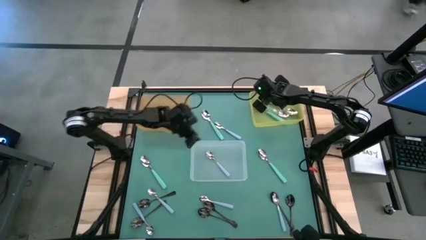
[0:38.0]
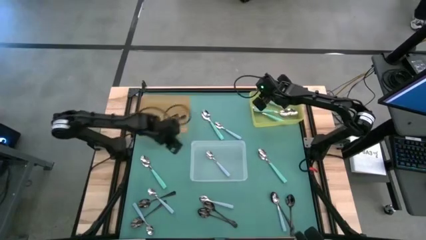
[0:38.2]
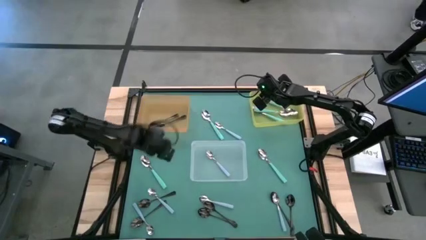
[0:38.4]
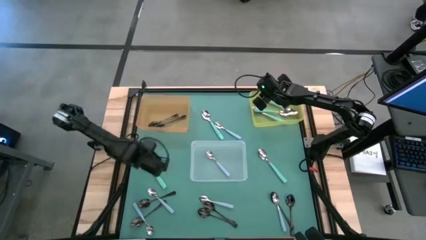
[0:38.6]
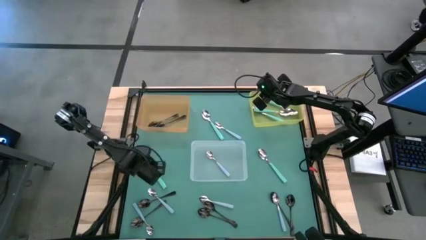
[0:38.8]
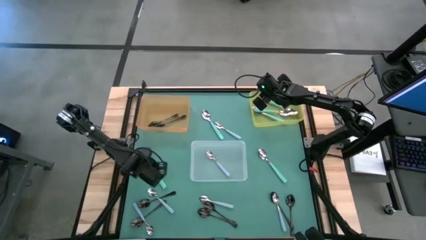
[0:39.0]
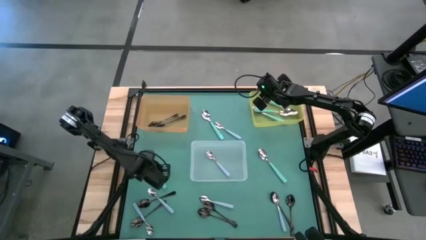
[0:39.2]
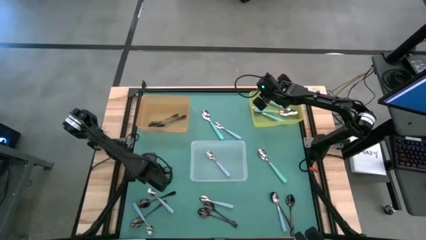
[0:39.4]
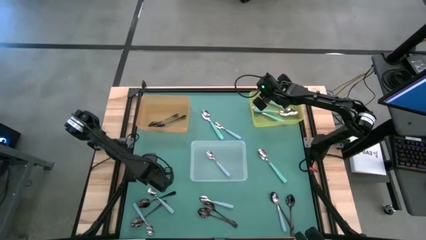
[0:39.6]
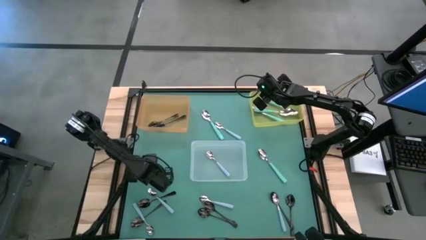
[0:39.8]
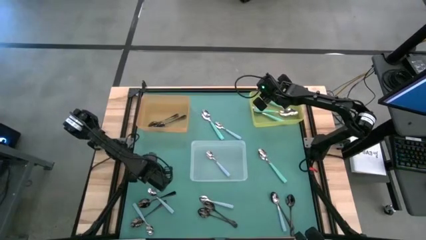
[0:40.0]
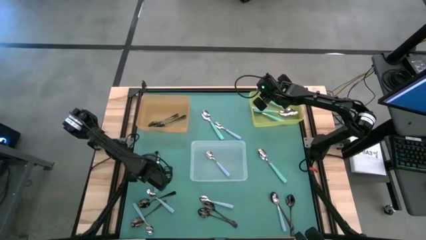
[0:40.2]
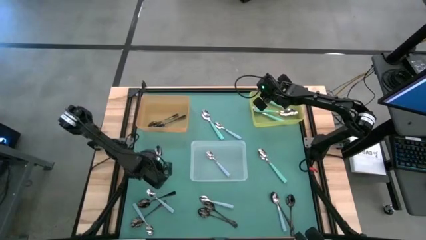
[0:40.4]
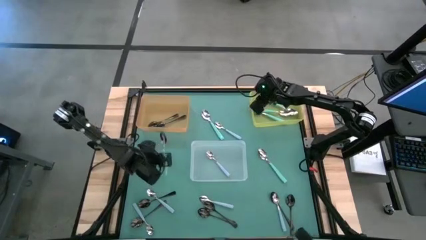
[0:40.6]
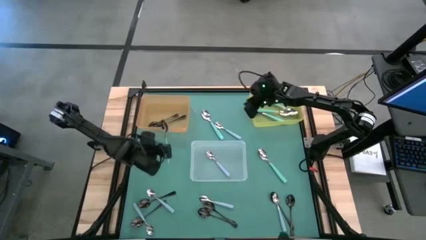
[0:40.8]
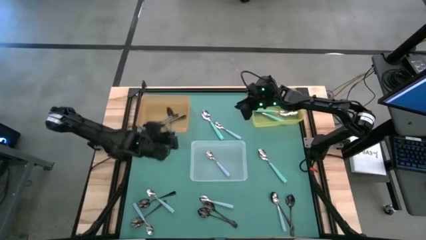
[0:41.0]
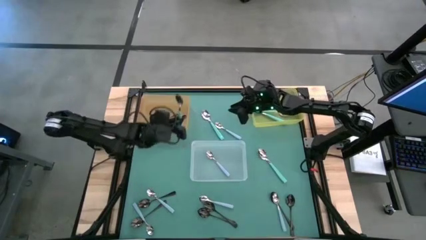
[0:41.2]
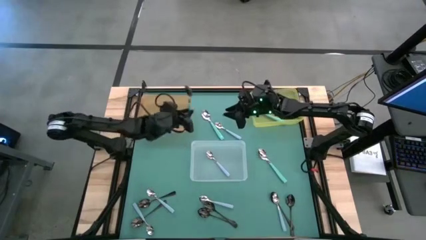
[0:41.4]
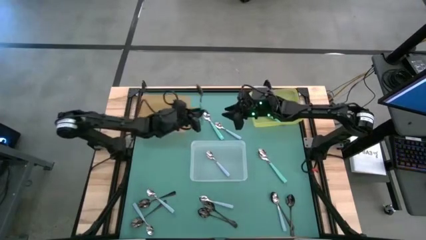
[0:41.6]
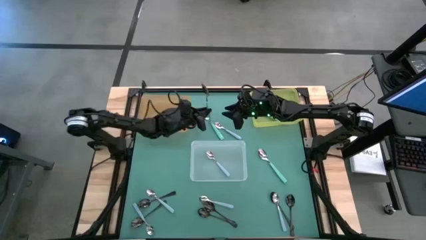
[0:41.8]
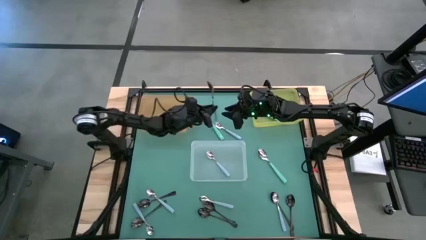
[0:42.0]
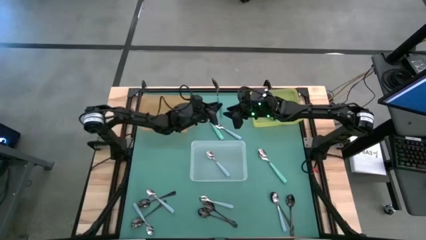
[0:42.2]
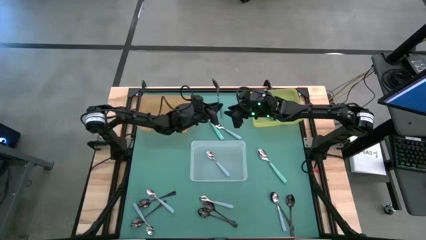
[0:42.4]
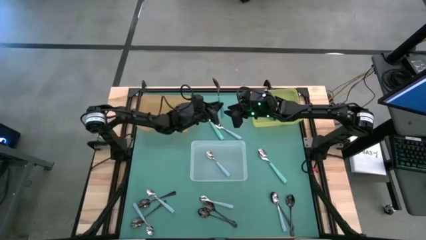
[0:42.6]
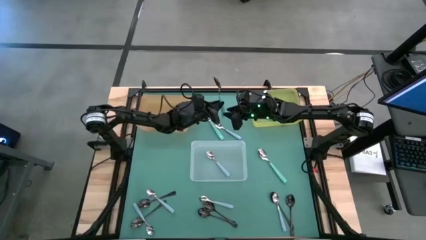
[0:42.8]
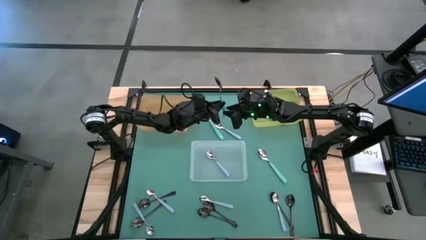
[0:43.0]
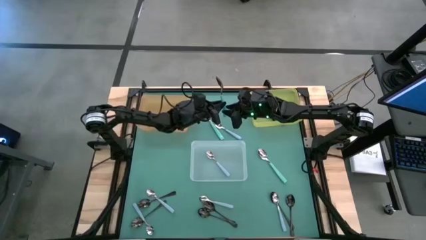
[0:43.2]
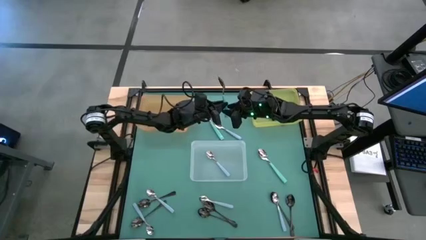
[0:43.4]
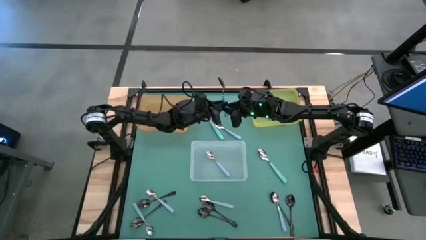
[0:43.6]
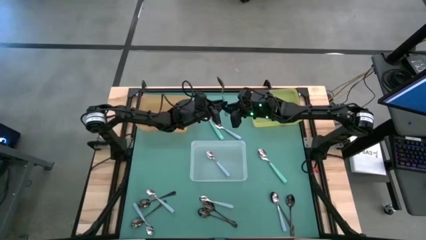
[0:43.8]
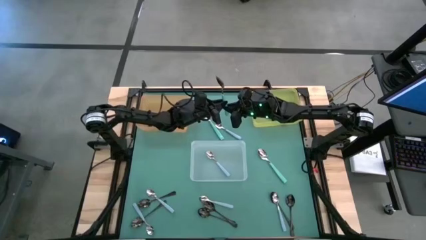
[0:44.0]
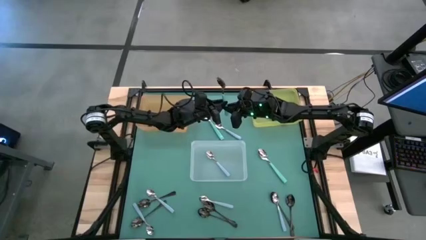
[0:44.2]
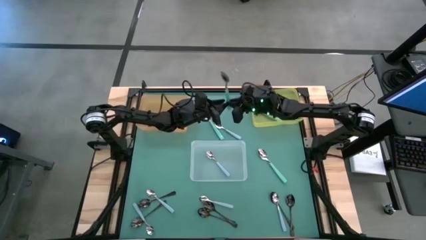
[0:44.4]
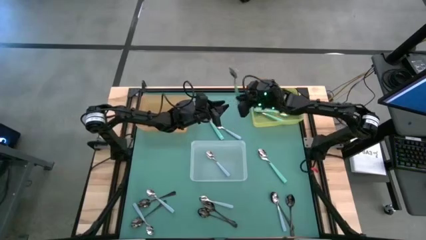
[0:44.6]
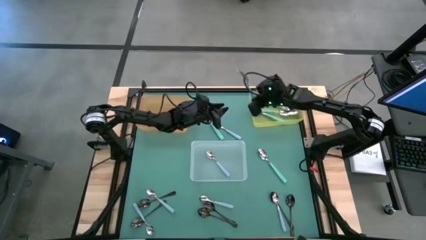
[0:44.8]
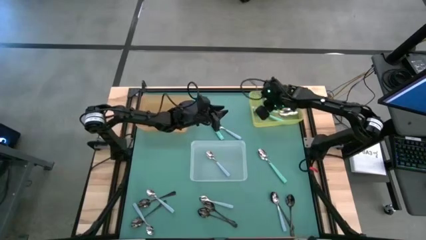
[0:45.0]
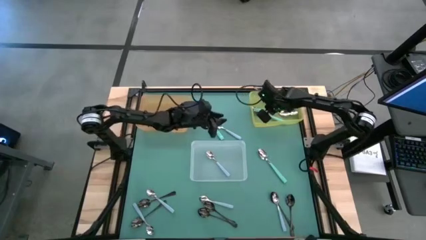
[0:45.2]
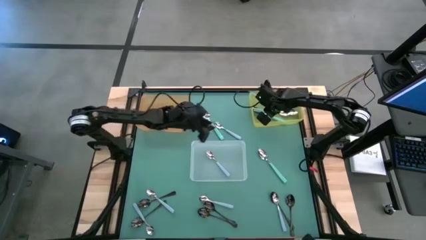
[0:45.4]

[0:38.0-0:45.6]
Task: Sort silverware by color (type)
Put the light blue spoon into the yellow bin

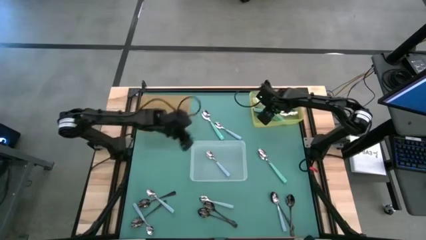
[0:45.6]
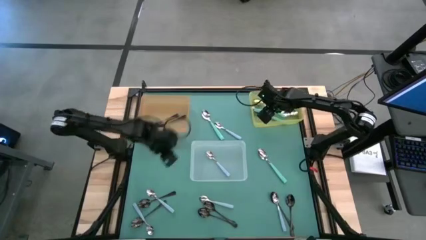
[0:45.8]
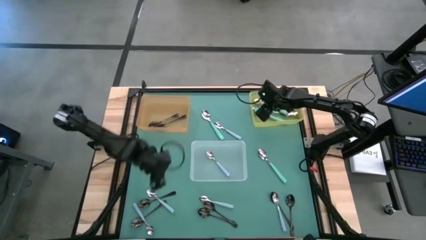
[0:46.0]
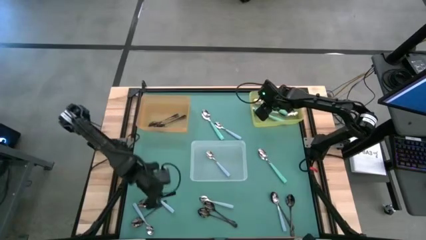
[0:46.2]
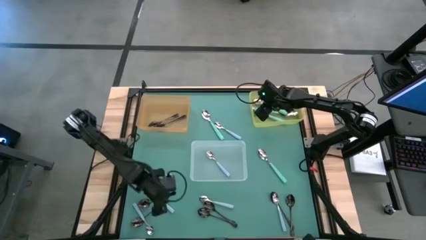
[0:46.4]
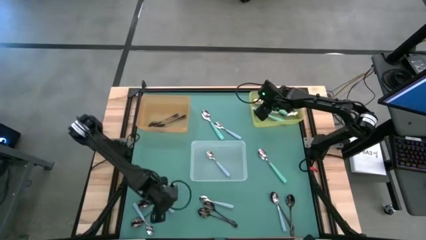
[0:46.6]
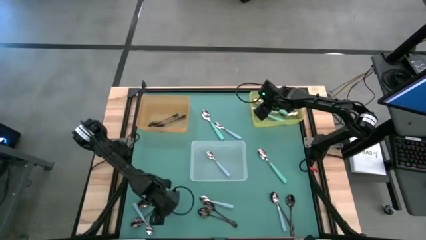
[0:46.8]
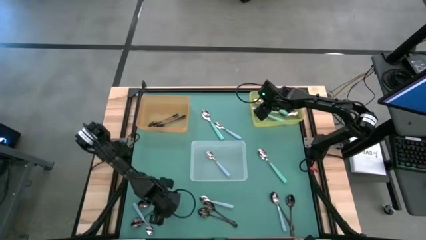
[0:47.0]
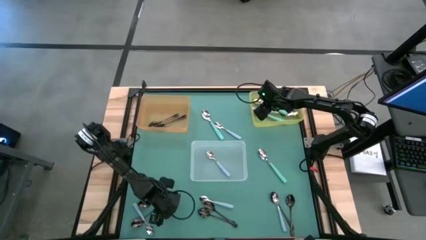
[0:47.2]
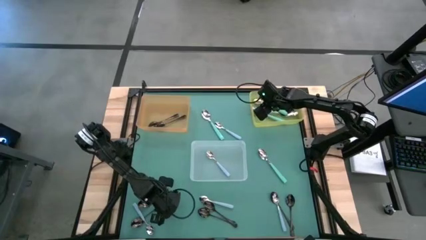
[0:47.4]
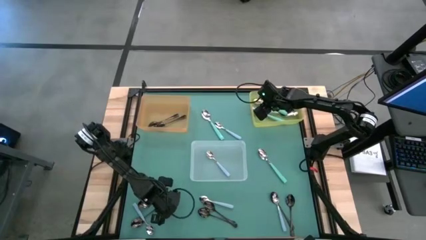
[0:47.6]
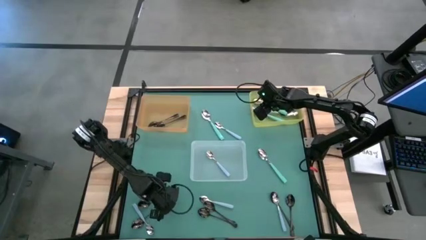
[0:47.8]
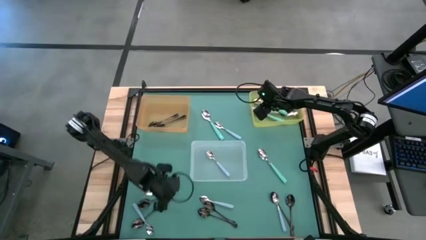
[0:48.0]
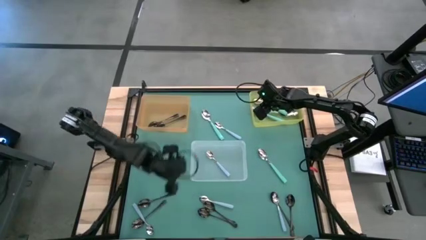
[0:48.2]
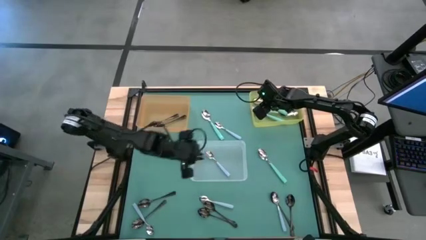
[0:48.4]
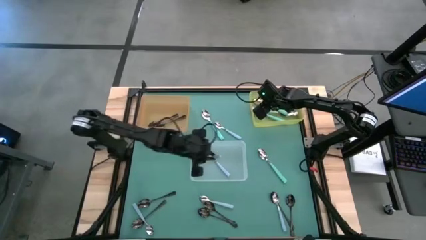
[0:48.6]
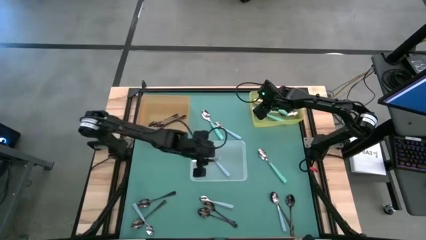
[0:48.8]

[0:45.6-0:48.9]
Put the blue spoon into the white bin

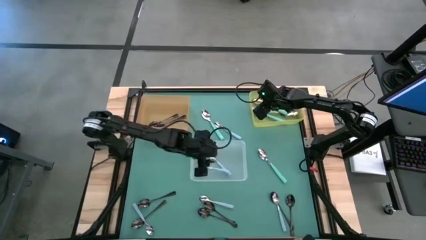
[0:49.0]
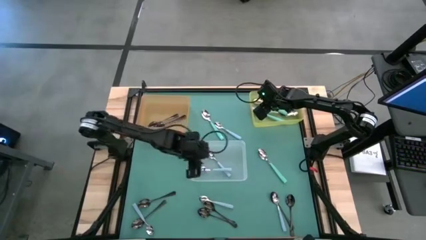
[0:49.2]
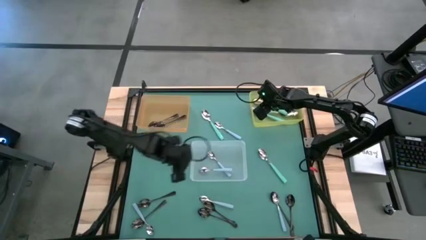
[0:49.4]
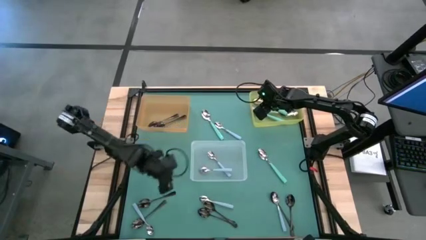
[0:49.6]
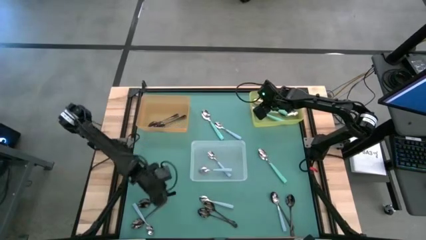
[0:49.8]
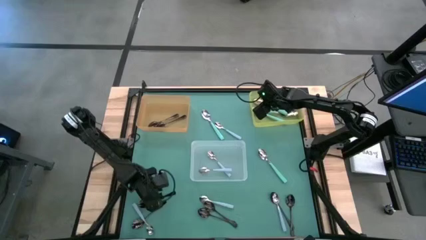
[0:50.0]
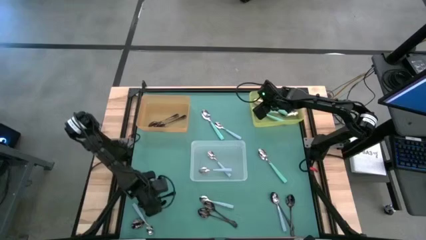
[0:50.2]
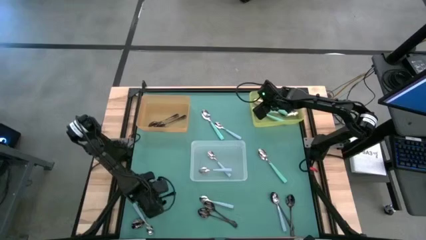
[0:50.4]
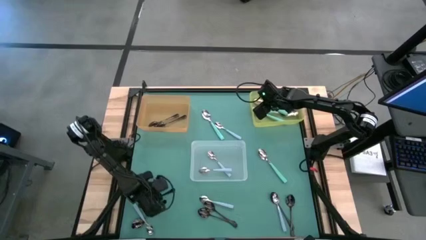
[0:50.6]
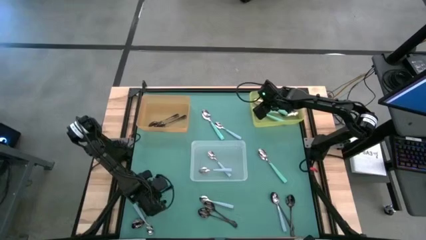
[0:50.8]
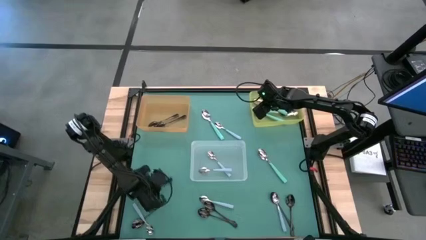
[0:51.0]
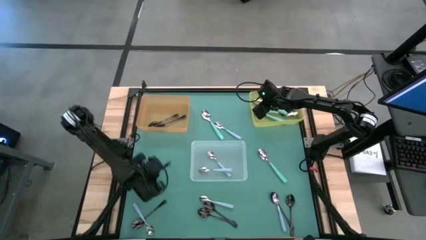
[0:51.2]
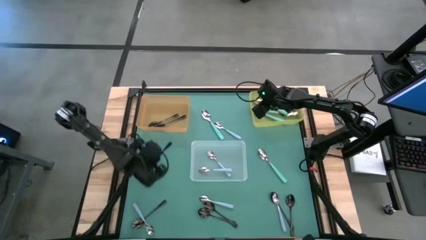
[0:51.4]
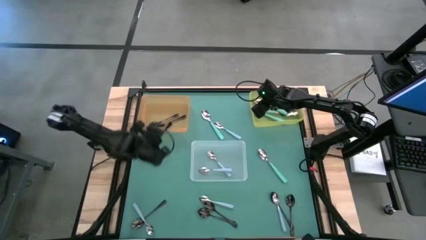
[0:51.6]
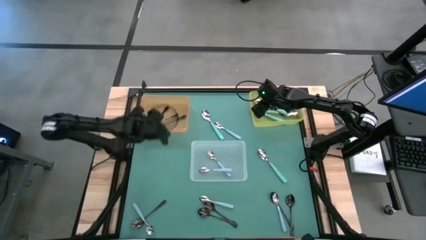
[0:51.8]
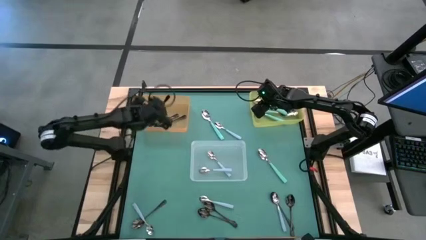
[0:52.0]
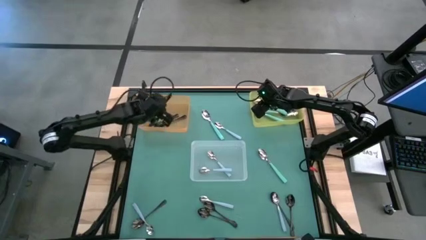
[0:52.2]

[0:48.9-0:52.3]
Put the black spoon into the orange bin

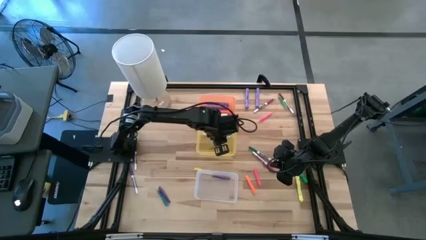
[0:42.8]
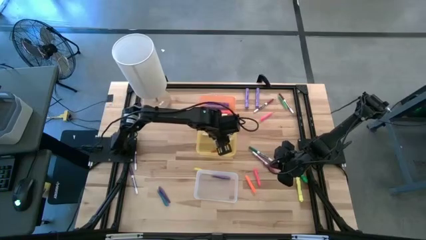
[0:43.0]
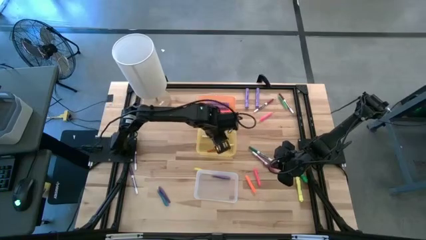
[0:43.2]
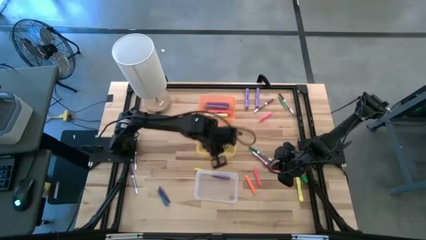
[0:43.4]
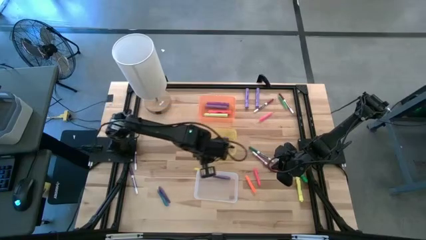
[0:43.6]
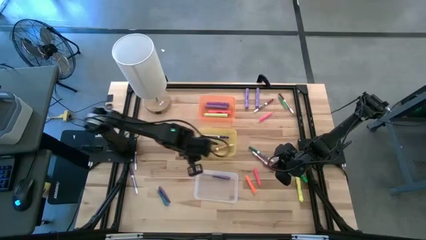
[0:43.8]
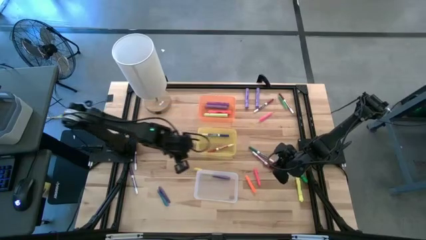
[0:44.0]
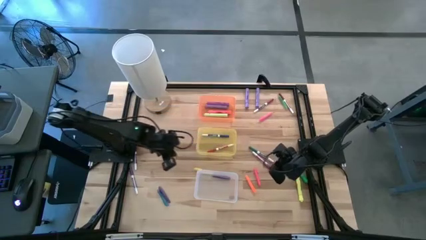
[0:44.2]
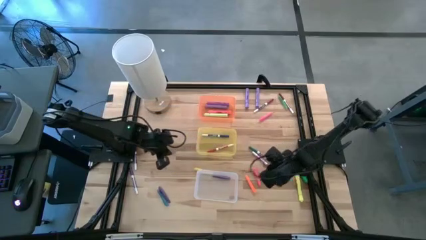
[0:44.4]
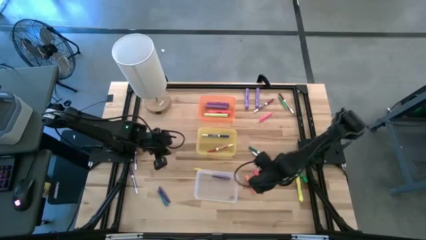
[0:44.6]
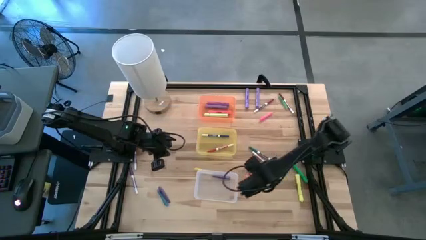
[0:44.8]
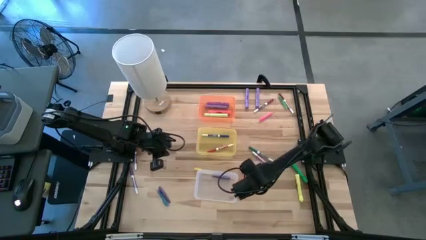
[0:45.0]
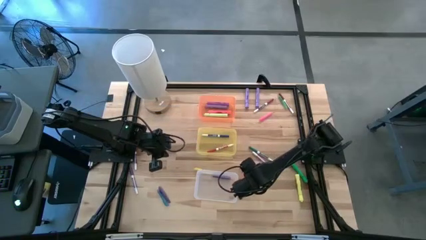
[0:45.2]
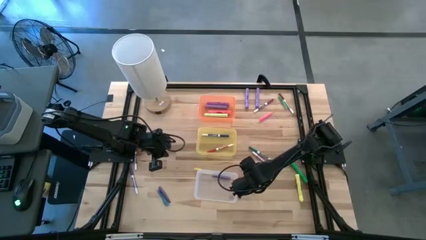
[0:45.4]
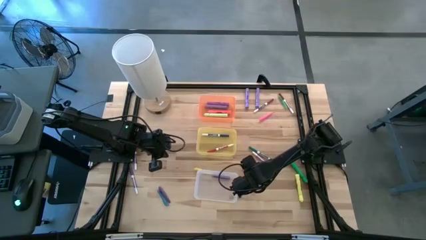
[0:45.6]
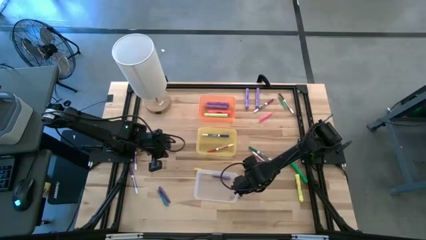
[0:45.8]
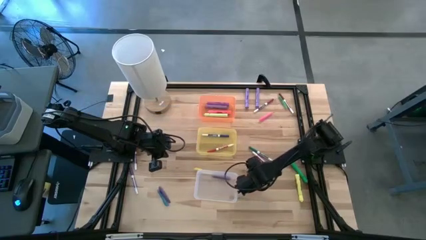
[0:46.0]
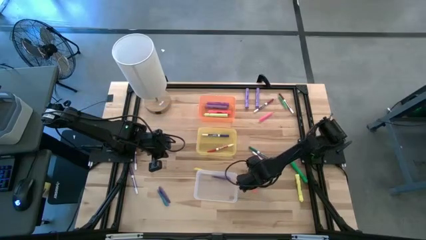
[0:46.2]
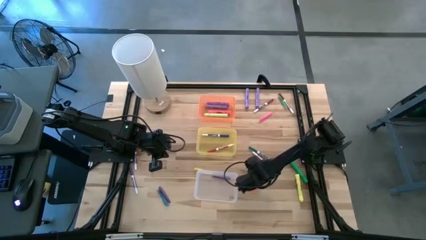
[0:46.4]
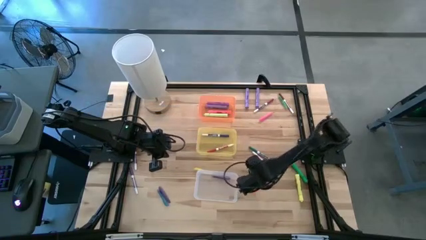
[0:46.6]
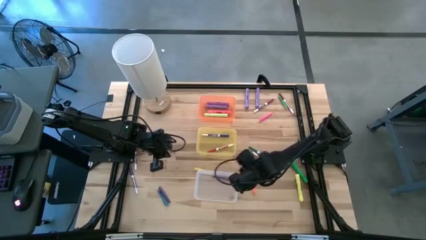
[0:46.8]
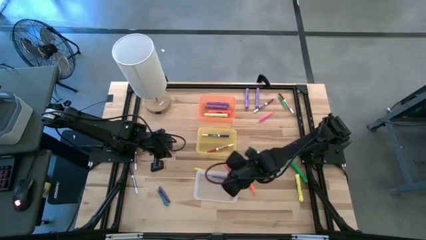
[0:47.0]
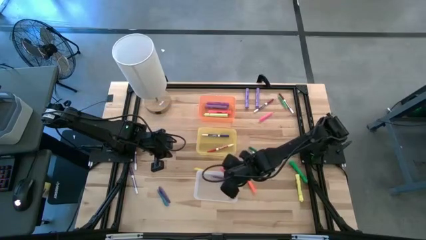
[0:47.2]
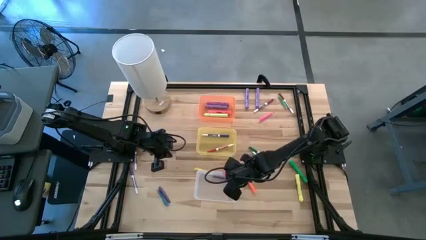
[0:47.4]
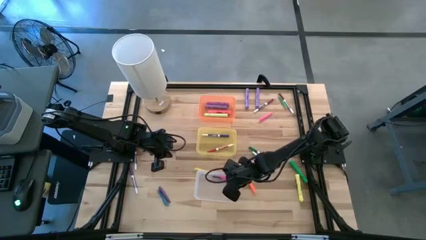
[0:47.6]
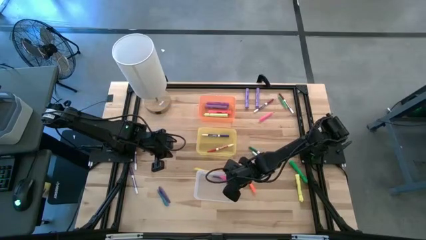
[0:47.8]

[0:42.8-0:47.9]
Task: Pick & Place Markers
Put the bottom pink pen into the white bin
